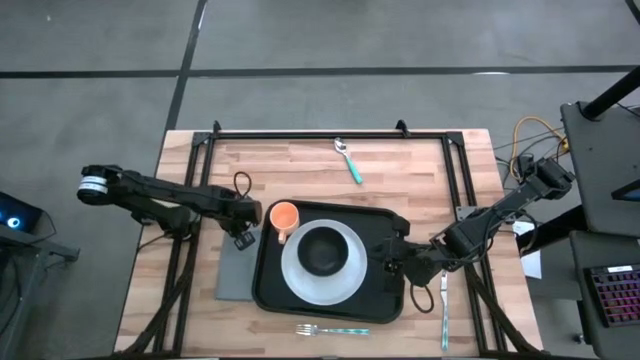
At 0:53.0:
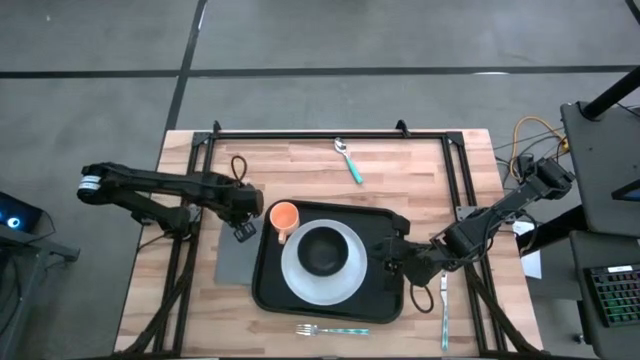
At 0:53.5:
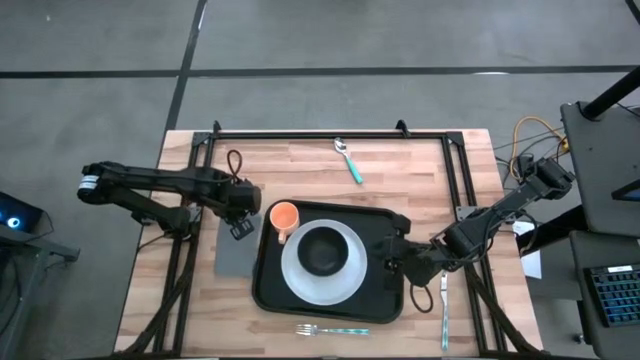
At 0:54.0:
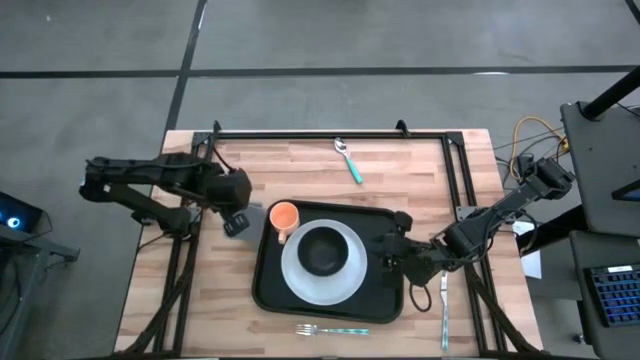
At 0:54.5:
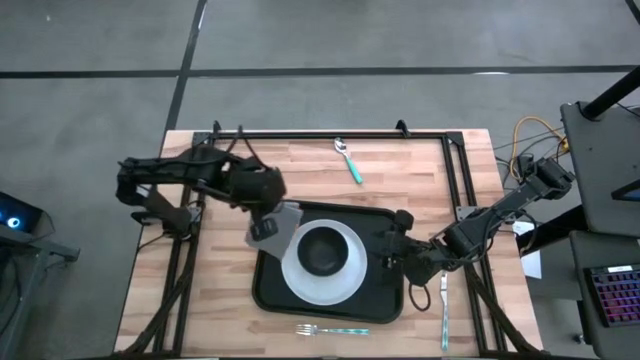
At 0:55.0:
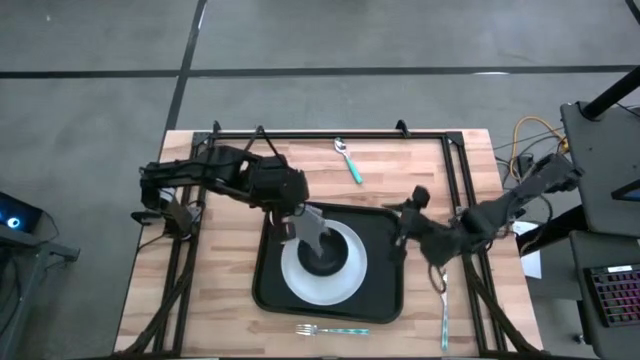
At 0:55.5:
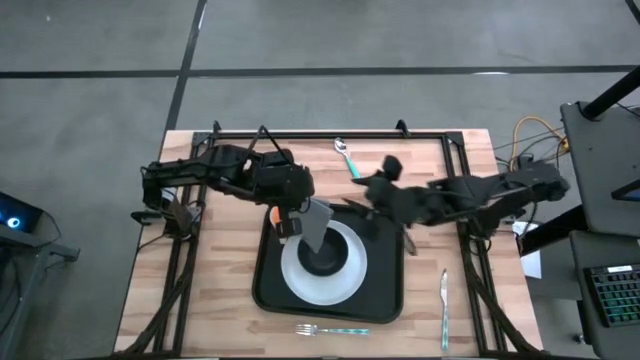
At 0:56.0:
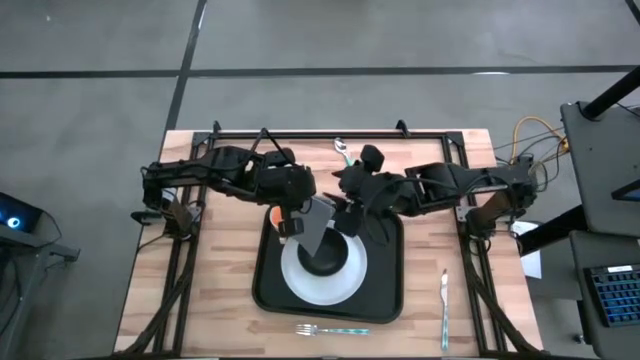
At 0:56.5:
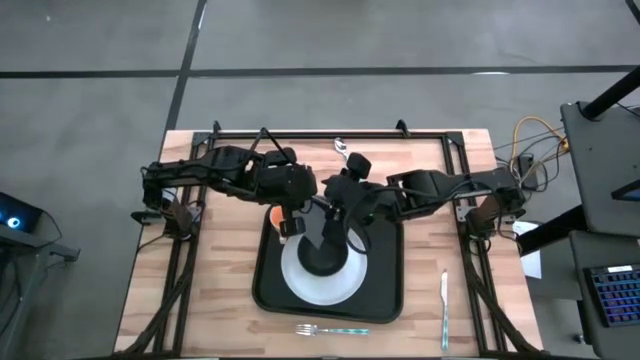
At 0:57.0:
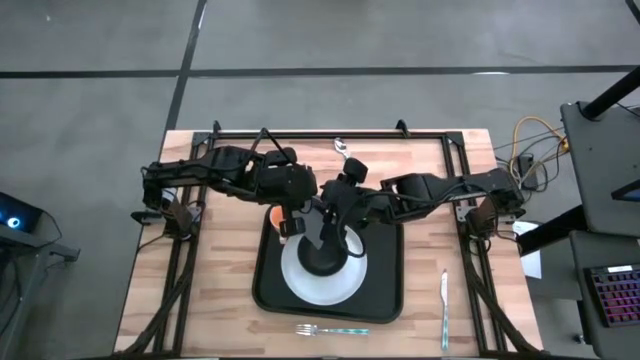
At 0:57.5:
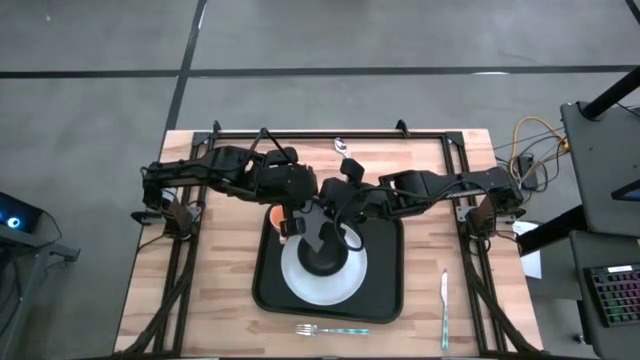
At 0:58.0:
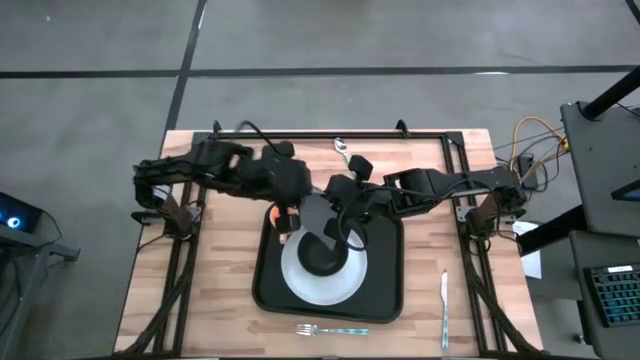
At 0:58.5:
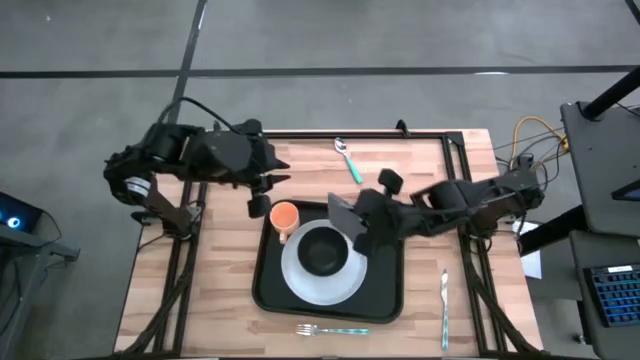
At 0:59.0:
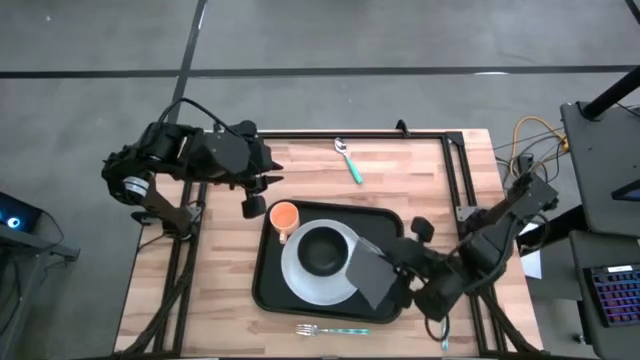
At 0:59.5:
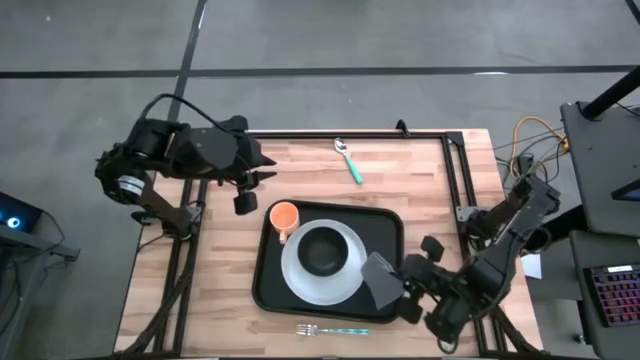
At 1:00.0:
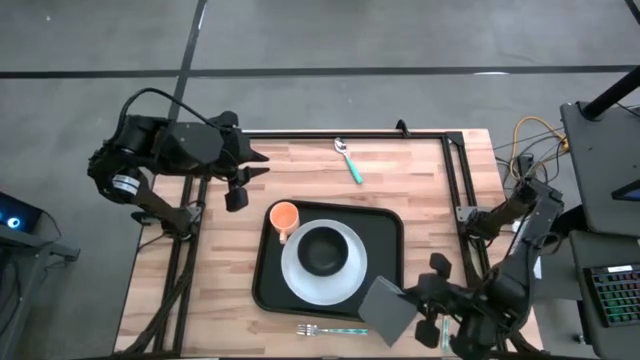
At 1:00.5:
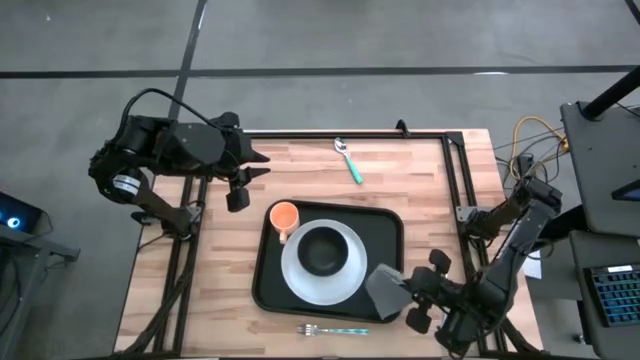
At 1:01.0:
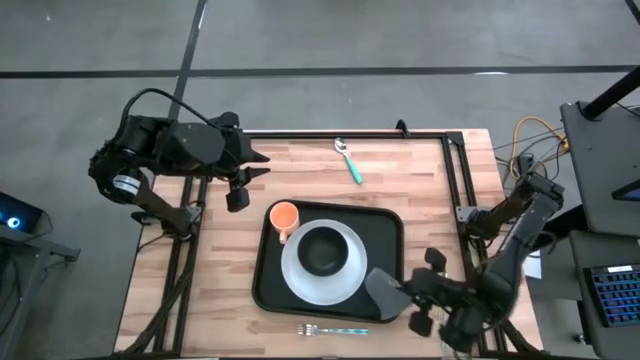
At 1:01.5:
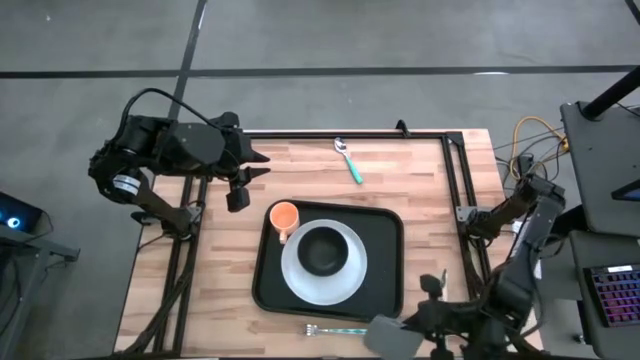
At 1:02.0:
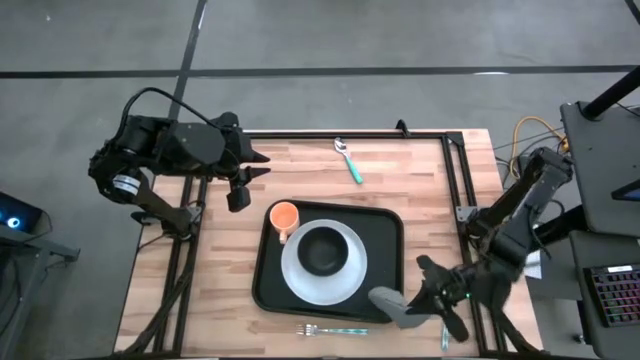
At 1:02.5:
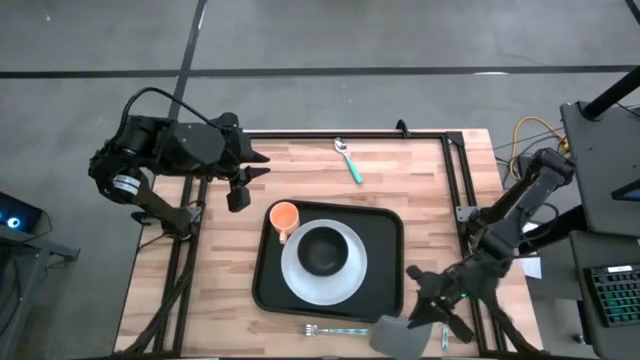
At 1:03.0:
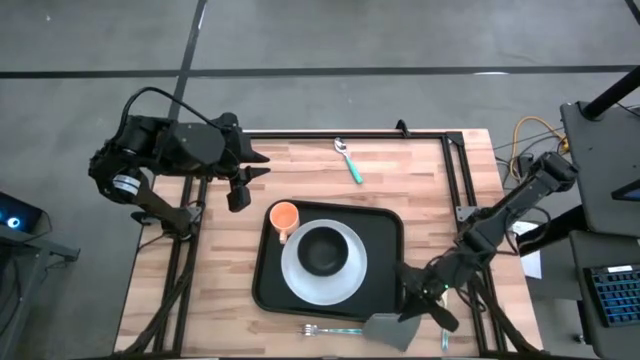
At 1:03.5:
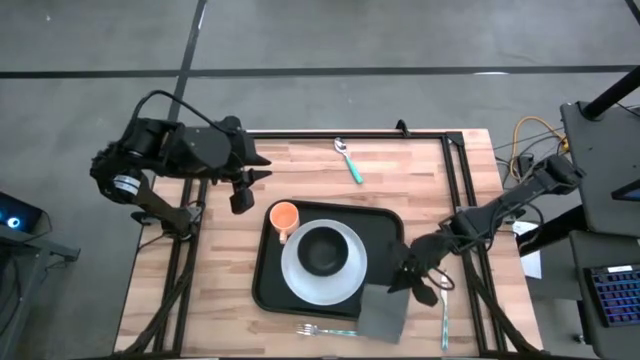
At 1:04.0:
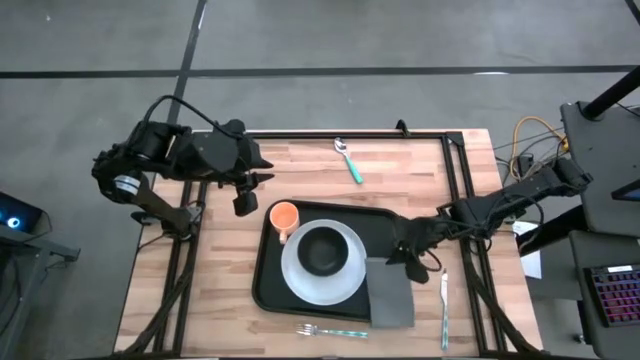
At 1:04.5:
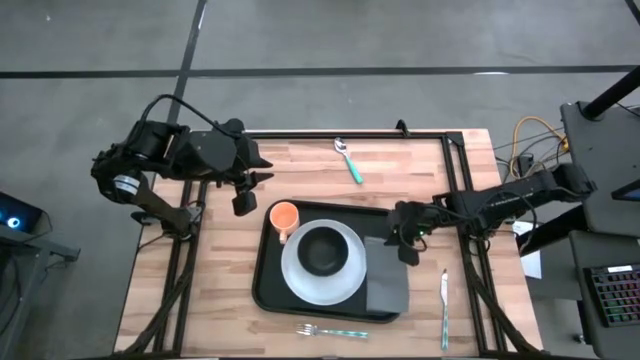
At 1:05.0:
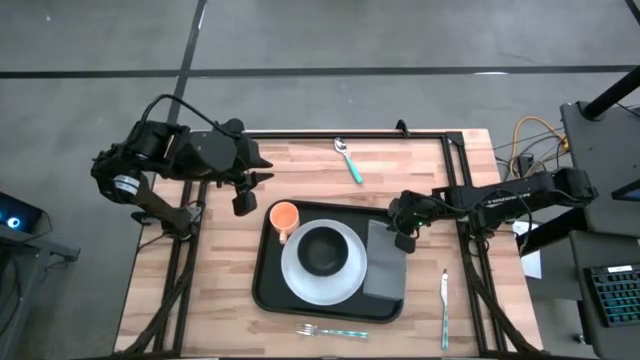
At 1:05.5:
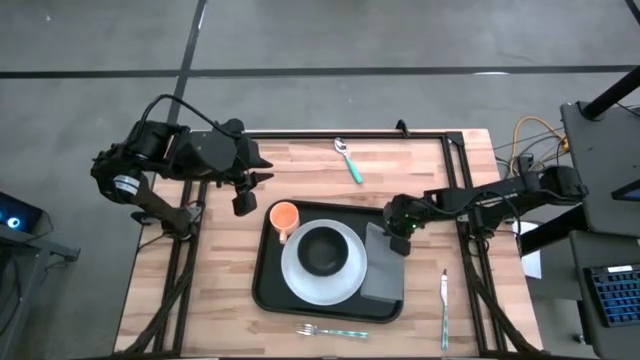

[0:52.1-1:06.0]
Task: Set up tray
Put the gray napkin on the black tray to the right of the white plate

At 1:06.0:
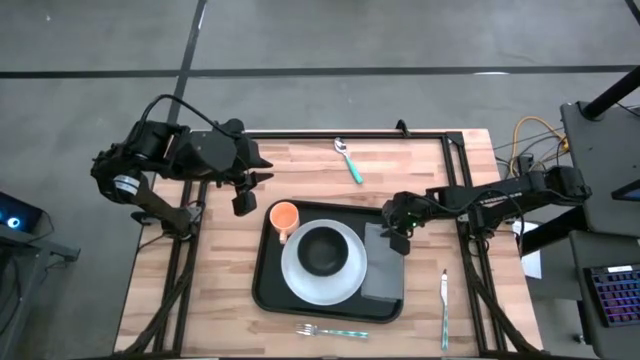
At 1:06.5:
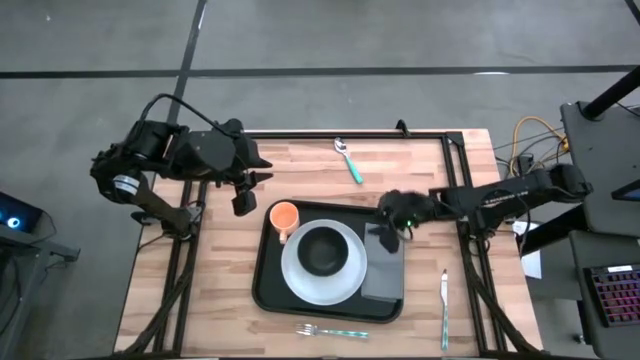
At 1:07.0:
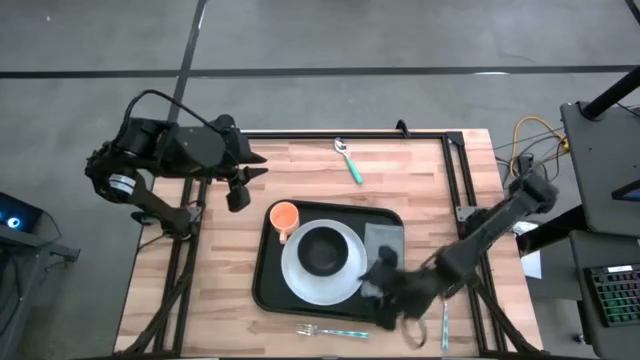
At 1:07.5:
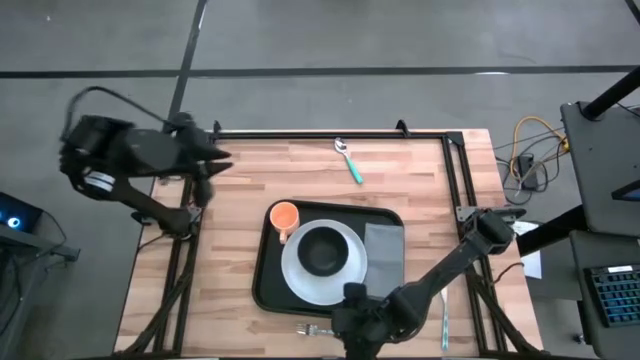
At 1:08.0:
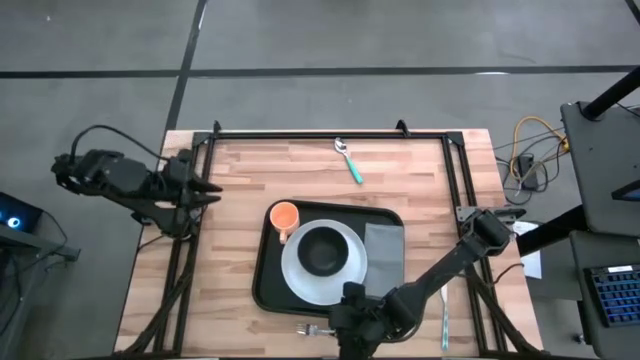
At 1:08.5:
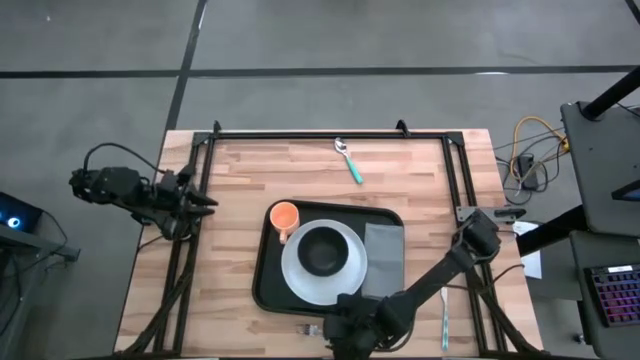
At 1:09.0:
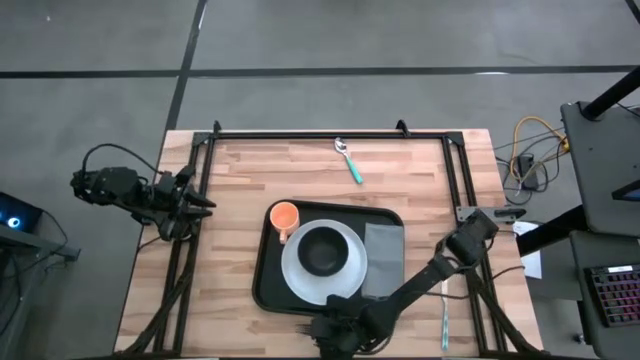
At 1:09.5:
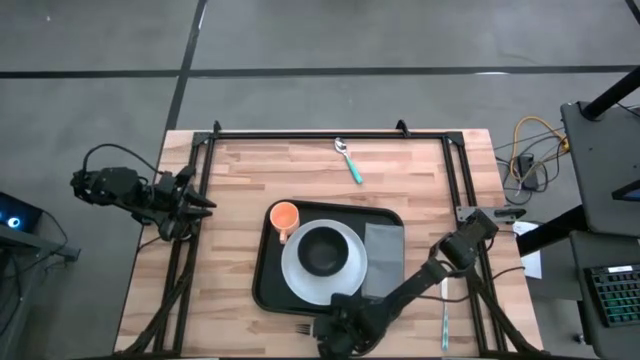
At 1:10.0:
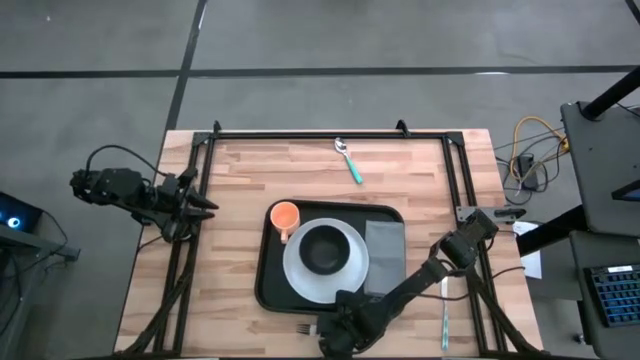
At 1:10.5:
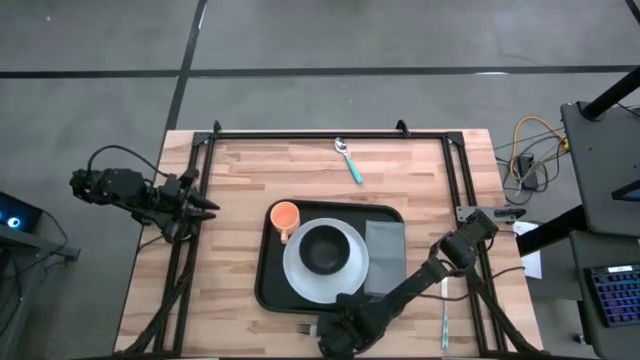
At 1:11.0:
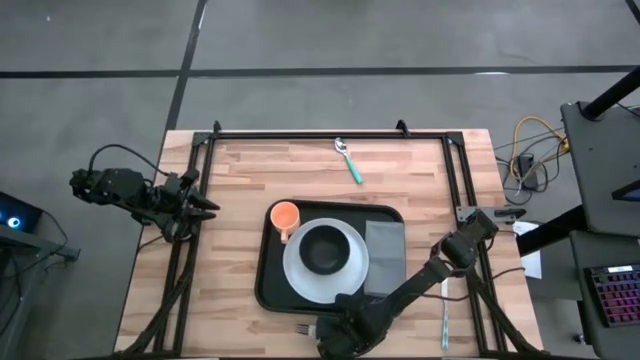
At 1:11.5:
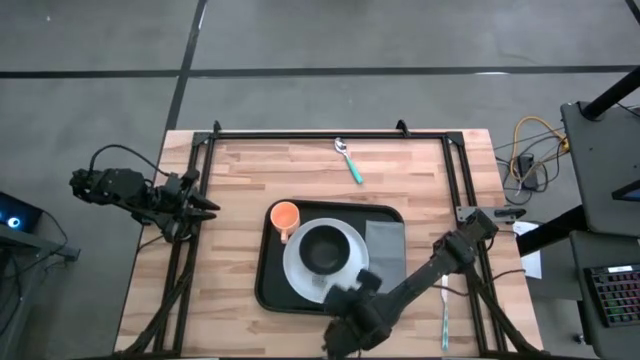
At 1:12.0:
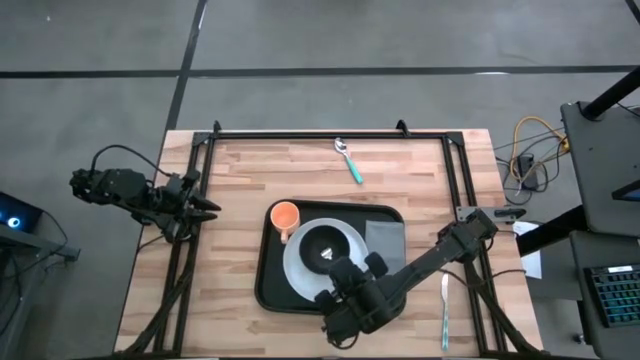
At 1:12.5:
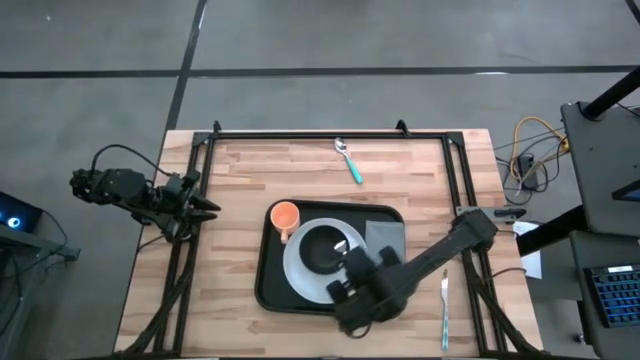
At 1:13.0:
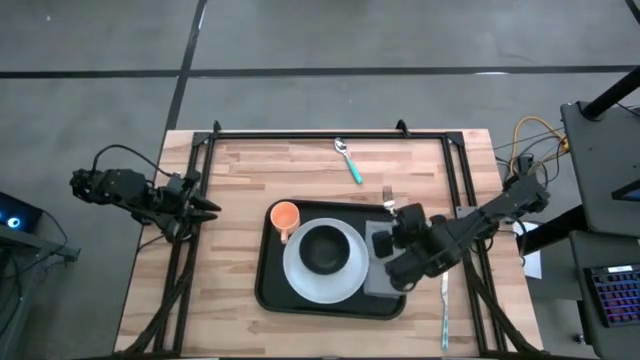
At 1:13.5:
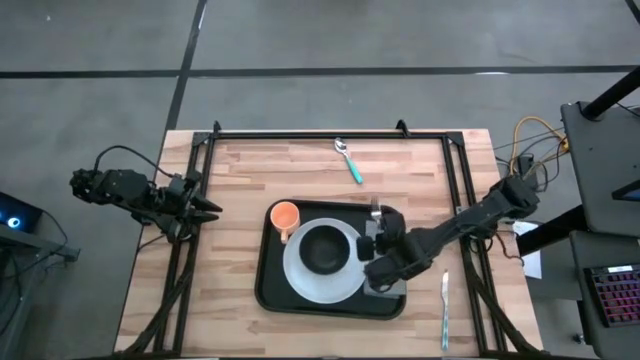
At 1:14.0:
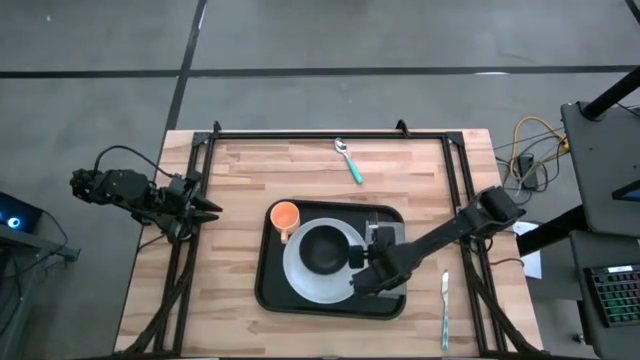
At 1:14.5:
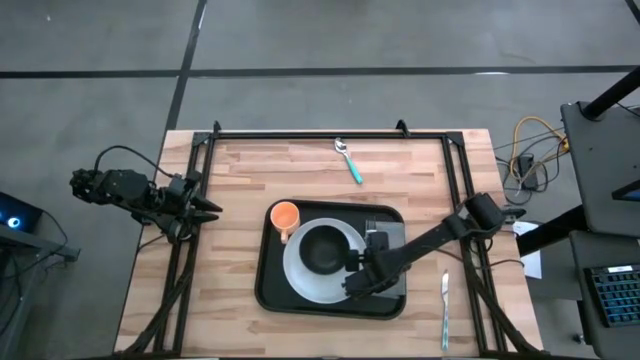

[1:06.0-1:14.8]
Put the green fork on top of the gray napkin

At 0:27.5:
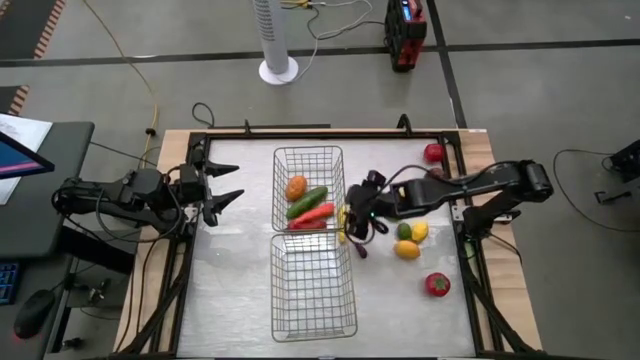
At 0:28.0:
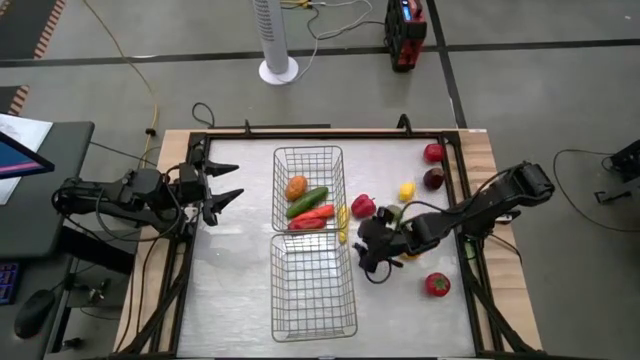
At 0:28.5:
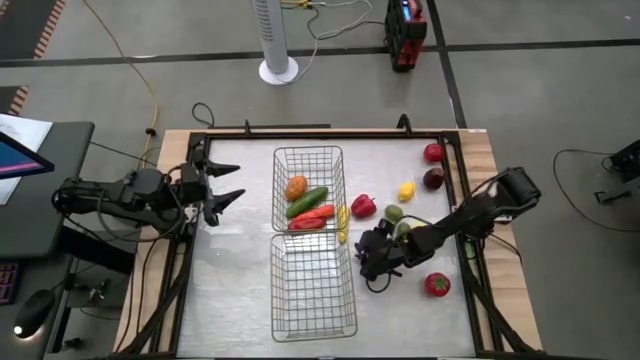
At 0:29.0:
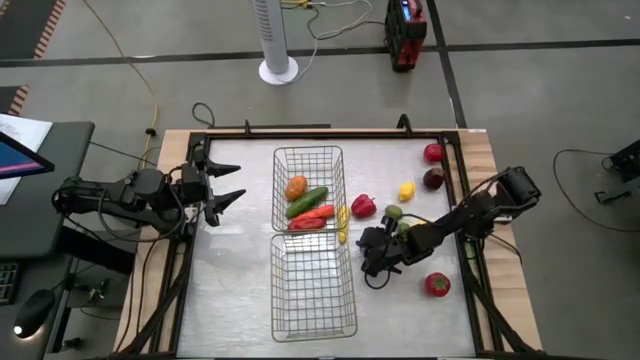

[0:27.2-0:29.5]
Task: Sort produce into baskets
Put the eggplant into the top wire basket
